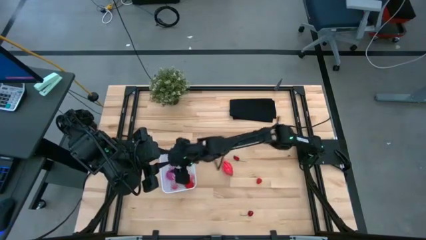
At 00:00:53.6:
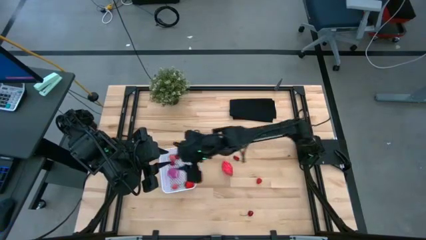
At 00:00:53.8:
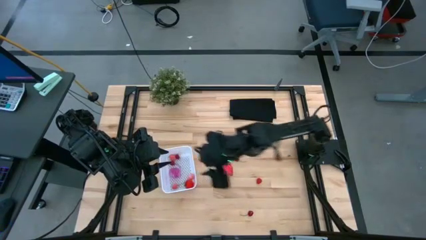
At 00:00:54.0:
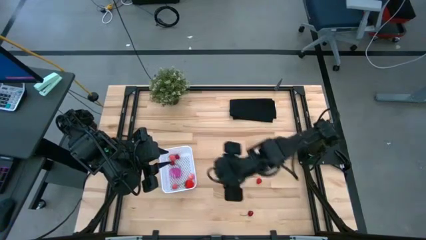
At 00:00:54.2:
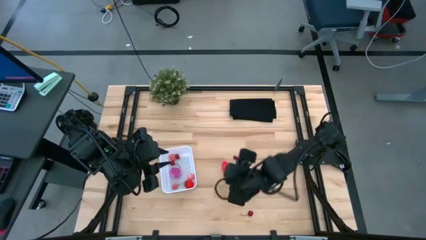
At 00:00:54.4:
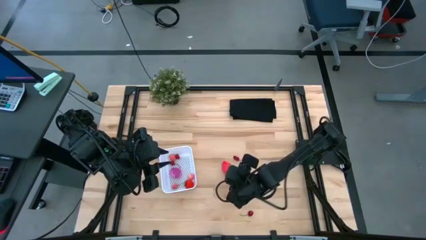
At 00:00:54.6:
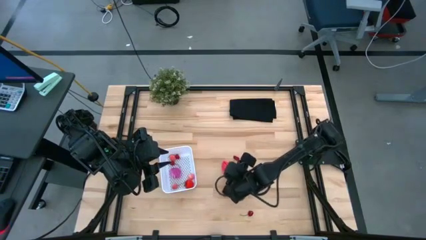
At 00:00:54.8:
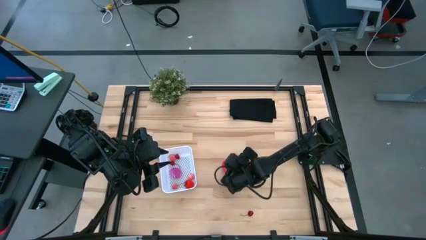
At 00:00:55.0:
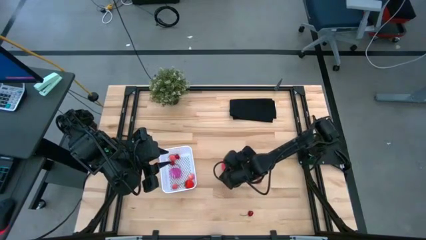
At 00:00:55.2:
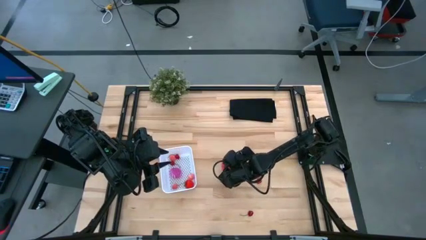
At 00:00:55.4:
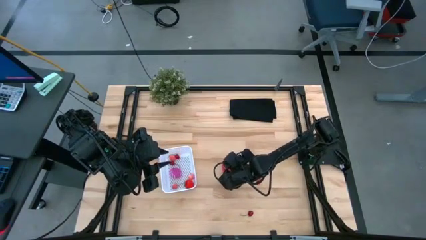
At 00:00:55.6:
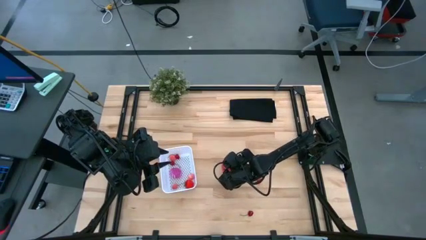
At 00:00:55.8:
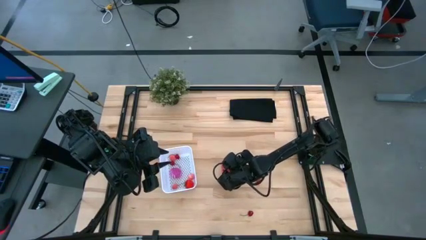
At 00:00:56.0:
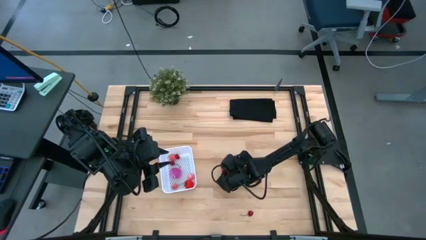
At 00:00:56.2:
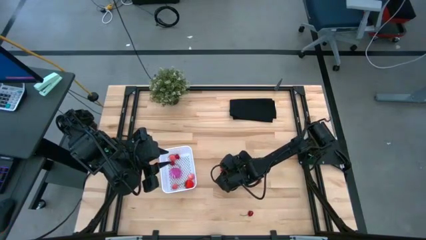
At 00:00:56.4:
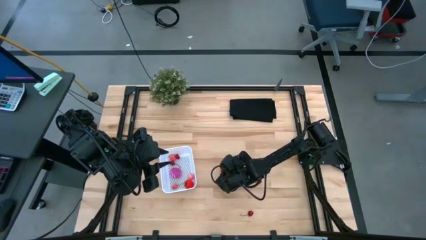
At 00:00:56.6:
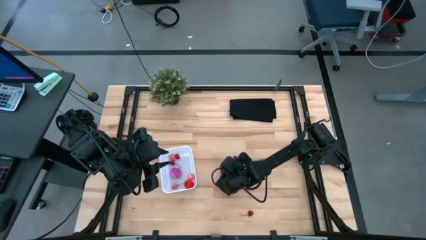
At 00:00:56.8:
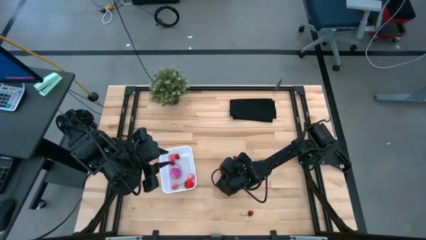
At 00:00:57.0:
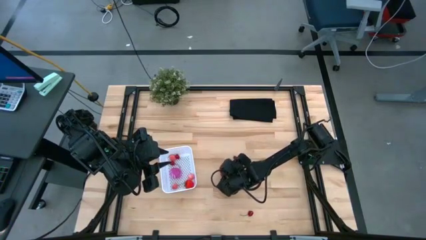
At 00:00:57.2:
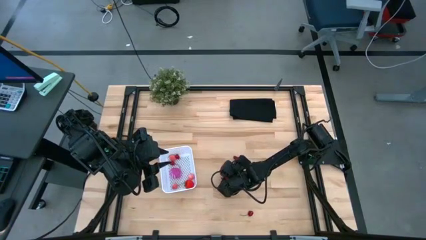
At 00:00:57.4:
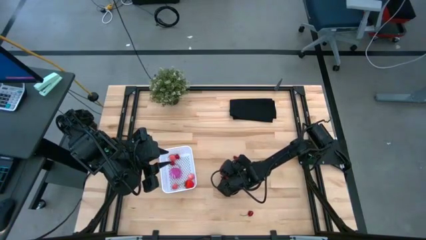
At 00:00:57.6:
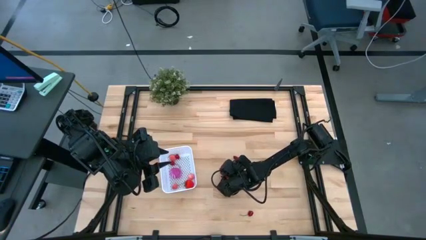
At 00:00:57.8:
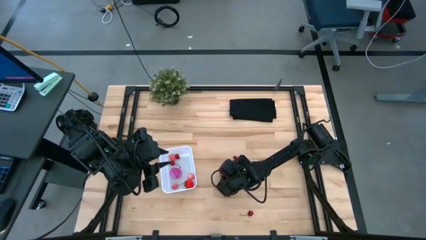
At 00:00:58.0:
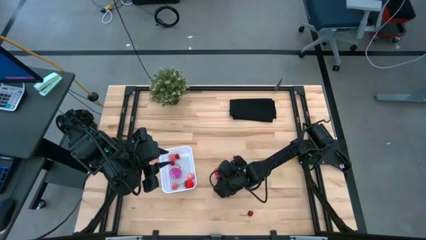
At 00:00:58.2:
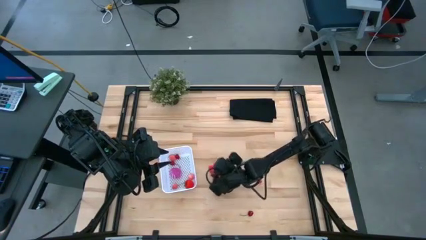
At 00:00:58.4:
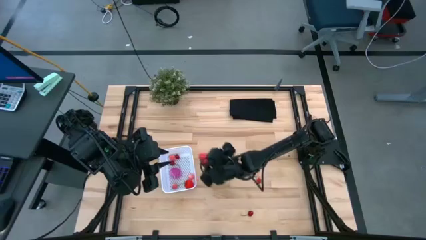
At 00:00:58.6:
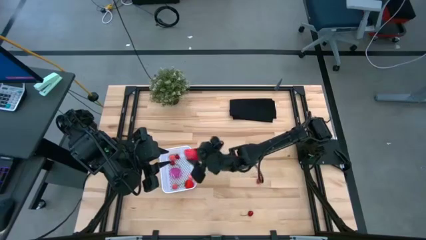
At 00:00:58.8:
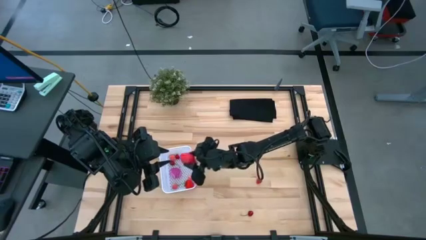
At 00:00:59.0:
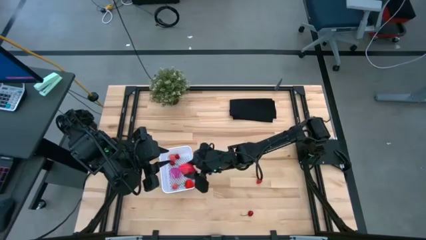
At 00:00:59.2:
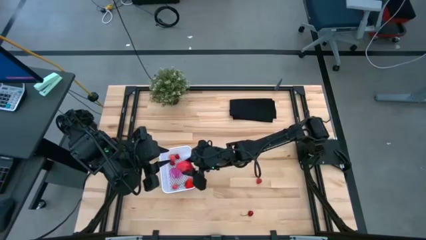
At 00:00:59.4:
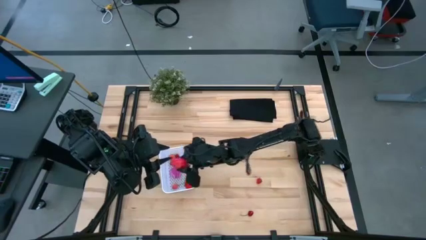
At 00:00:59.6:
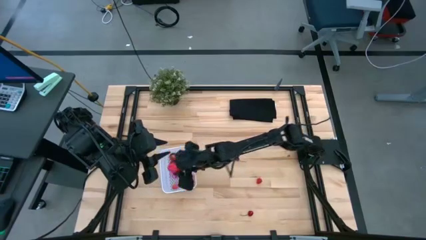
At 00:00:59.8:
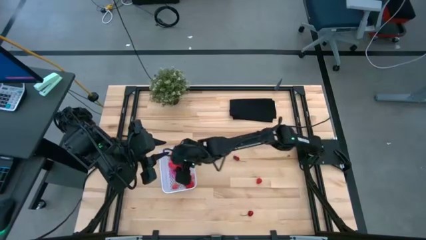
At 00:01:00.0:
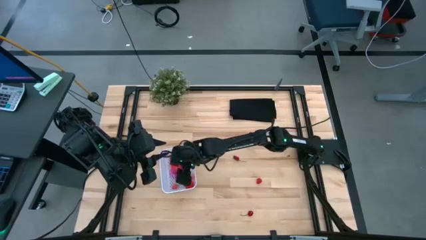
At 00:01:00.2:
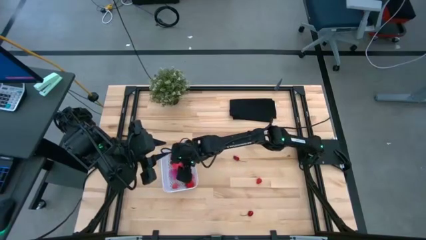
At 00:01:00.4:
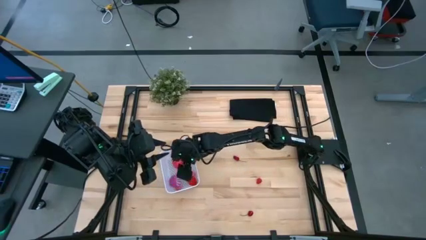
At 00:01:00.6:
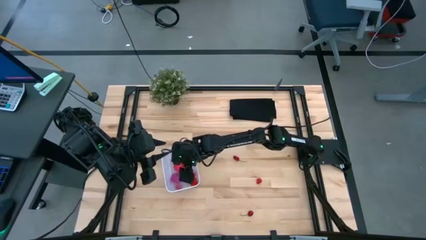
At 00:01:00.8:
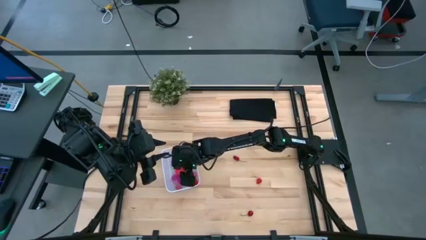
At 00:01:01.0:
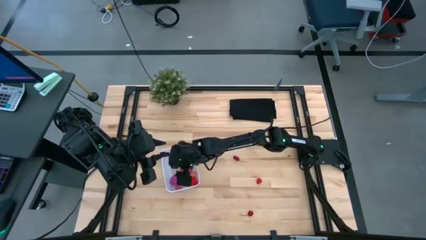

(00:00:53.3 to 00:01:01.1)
Task: Pick and placing Produce into tupperware
Put the dragon fruit into the white bin

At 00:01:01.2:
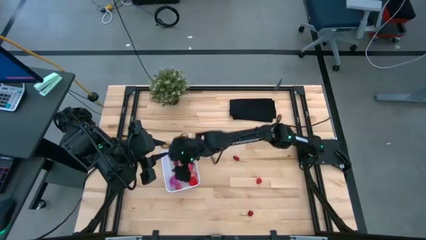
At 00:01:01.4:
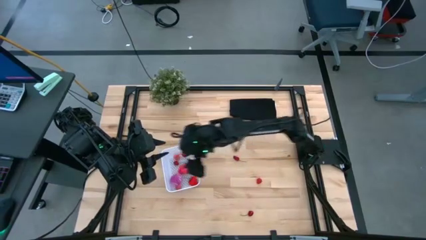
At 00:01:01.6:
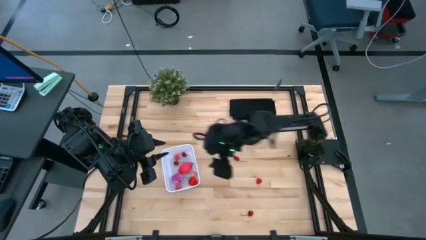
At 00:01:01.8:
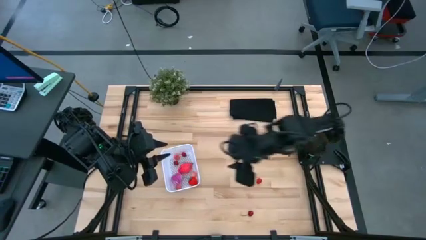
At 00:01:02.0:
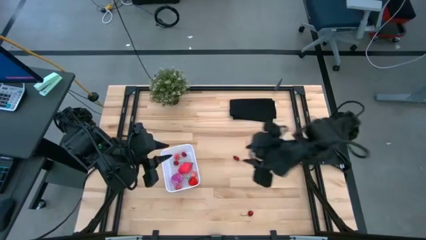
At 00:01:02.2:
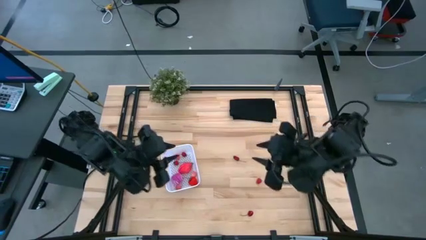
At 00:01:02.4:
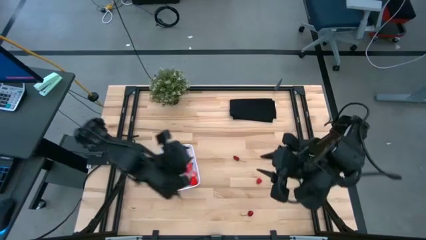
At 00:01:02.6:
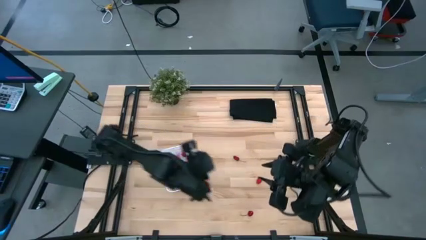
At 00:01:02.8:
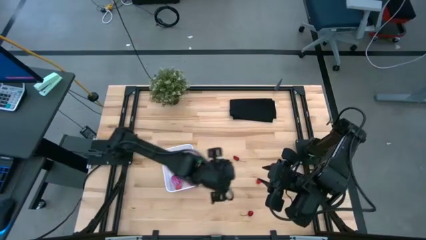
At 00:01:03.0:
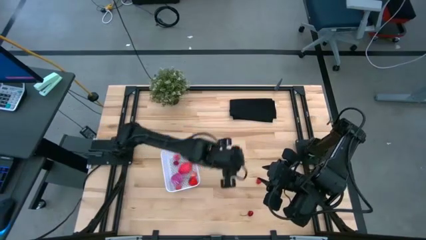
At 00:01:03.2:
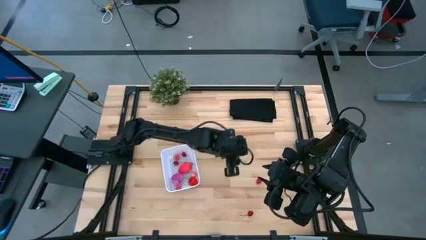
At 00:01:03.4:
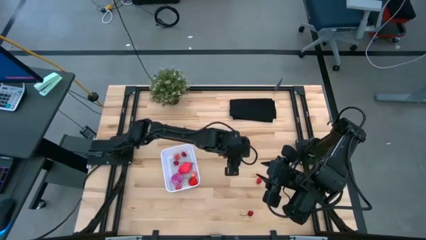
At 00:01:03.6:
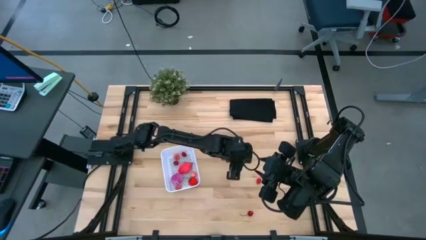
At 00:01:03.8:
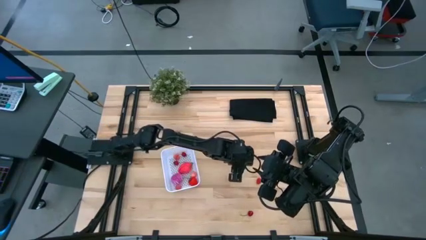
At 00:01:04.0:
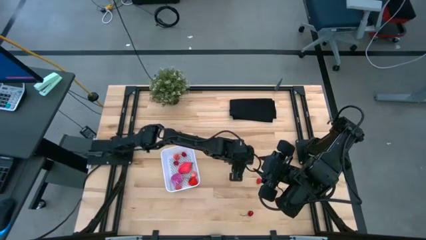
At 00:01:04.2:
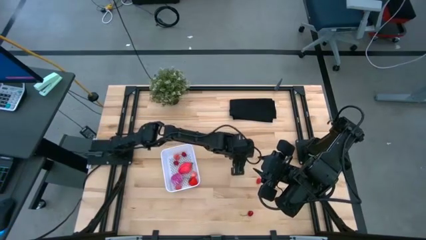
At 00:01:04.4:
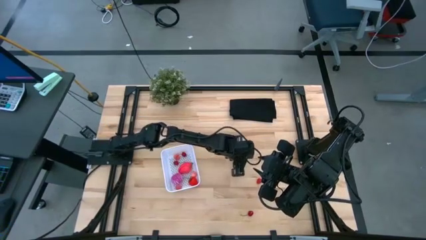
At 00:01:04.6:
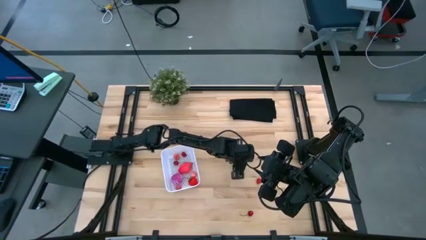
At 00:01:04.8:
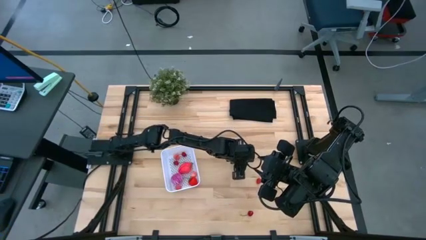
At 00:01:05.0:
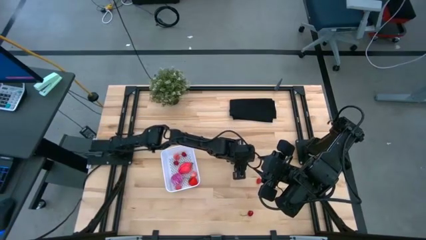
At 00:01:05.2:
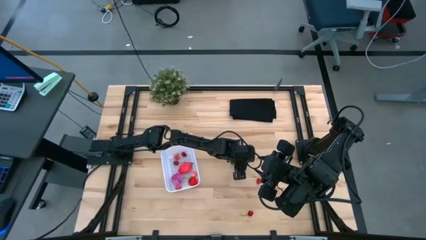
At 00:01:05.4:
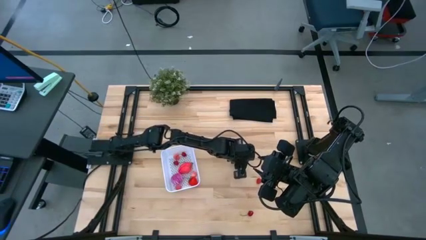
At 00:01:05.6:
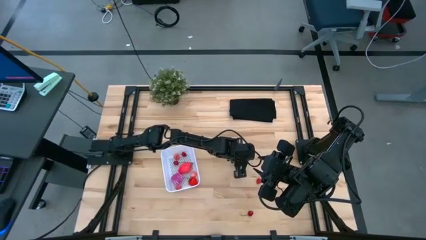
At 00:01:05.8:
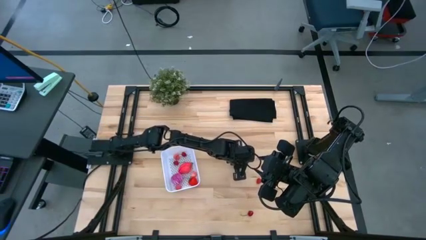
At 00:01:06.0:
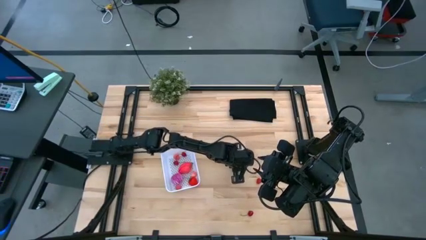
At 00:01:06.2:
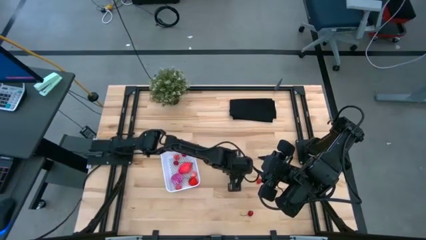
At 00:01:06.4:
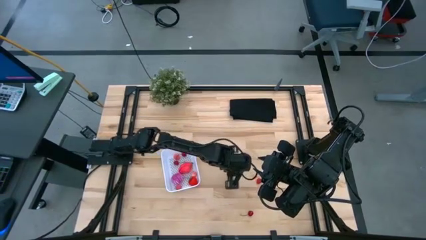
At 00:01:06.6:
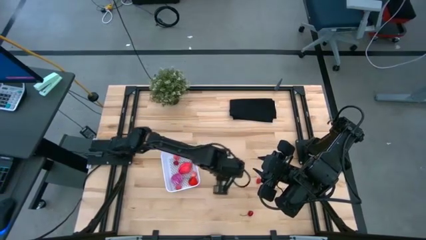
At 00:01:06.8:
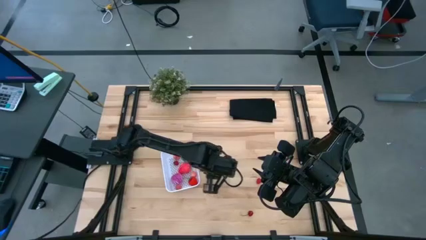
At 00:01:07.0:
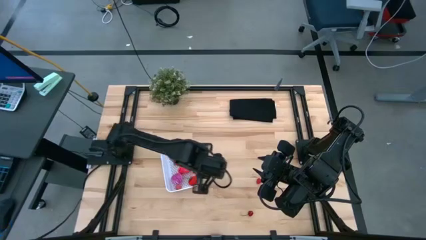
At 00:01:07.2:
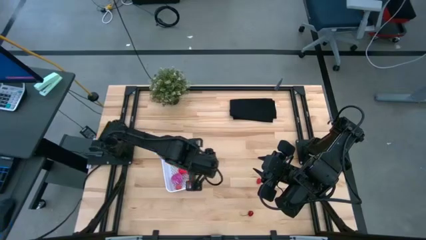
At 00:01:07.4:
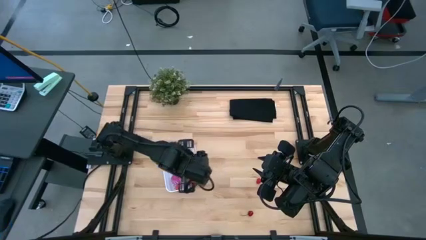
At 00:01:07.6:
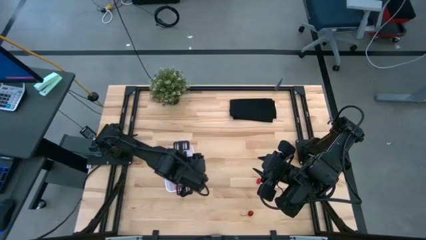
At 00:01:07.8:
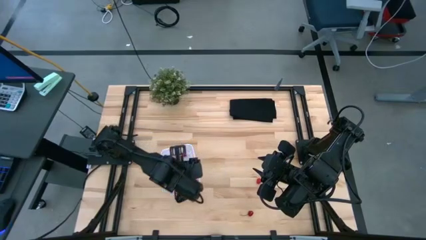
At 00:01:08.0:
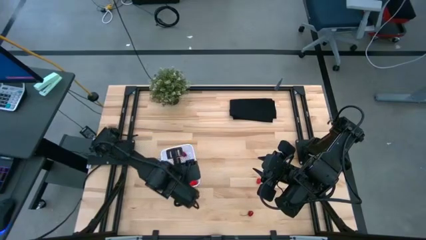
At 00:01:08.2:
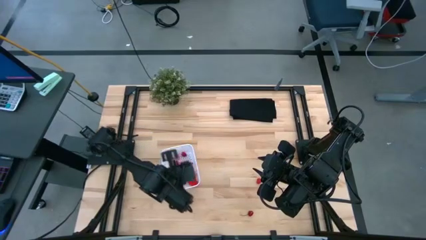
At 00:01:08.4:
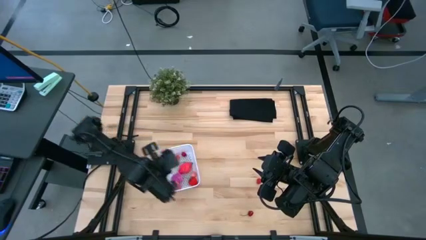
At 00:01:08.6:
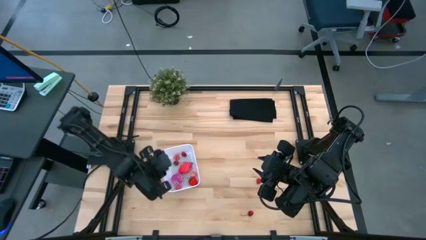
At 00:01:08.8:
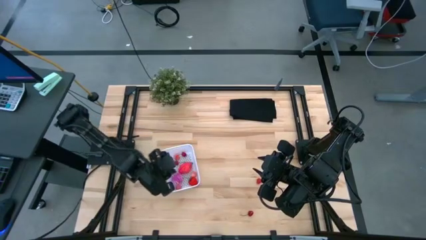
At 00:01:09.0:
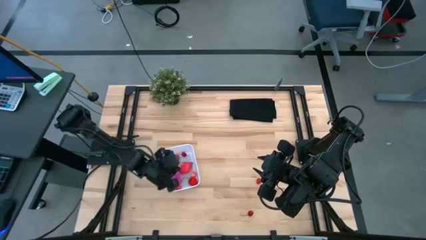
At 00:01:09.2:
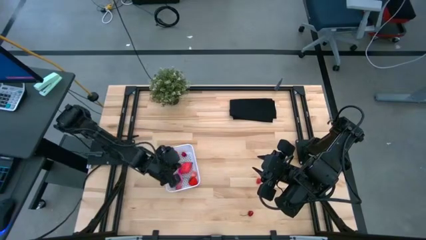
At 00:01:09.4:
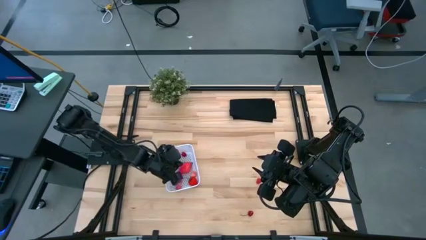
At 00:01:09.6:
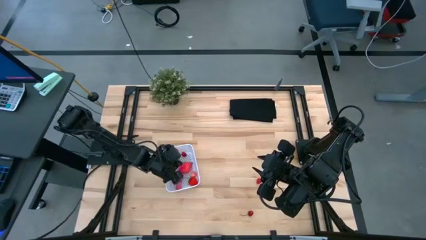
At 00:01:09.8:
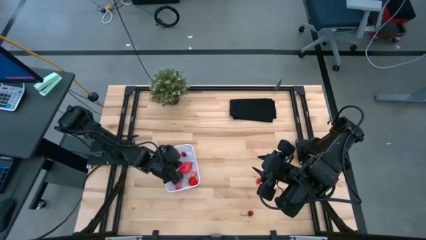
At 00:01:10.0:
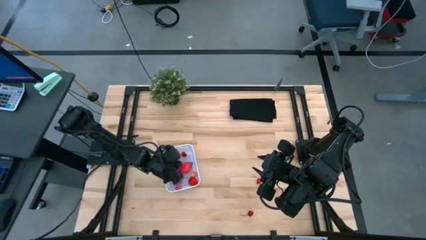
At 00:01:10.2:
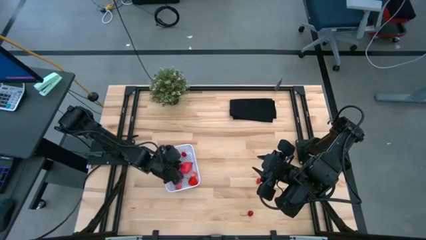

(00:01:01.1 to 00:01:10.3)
Put the top cherry into the white bin
